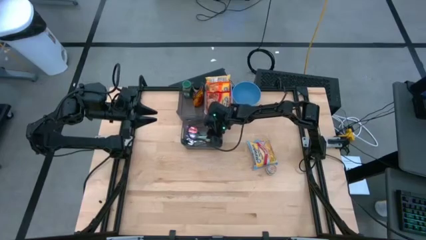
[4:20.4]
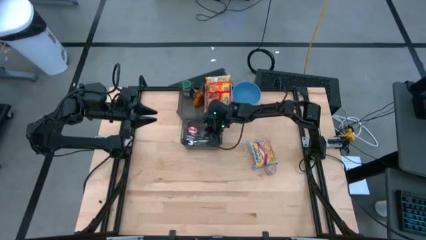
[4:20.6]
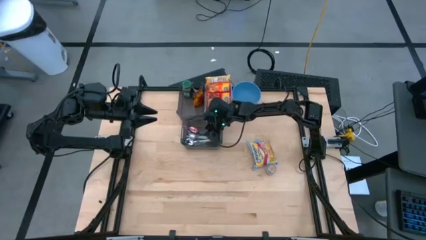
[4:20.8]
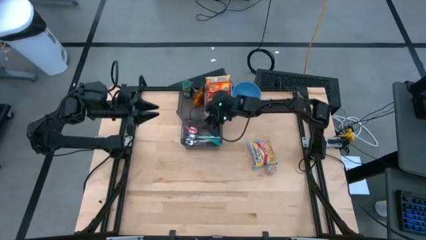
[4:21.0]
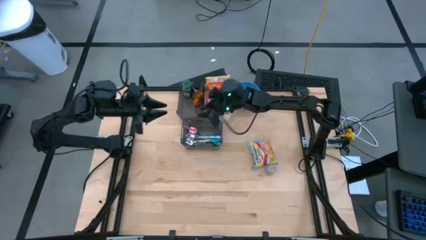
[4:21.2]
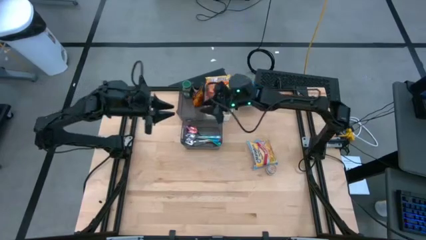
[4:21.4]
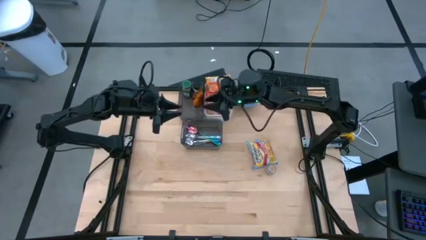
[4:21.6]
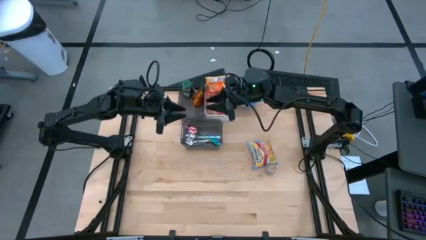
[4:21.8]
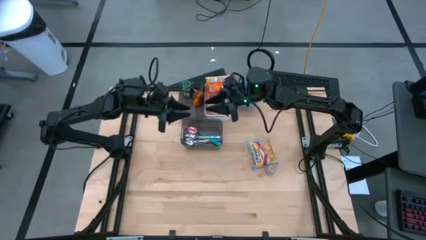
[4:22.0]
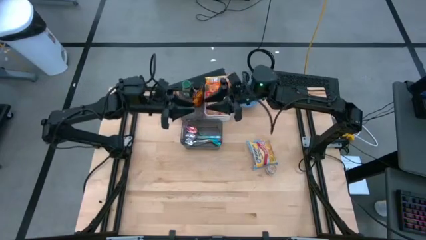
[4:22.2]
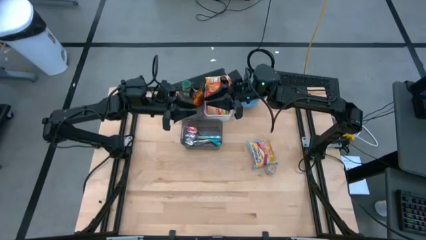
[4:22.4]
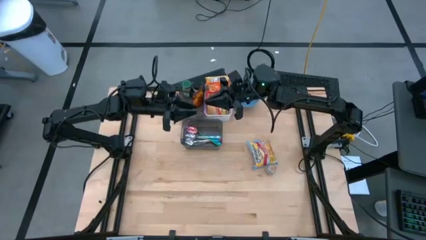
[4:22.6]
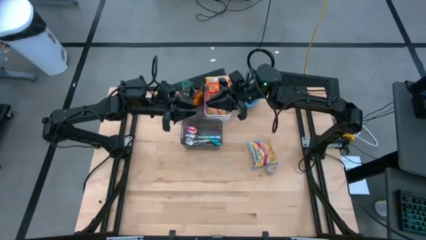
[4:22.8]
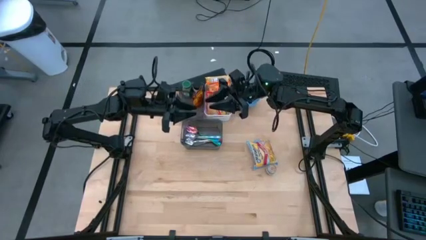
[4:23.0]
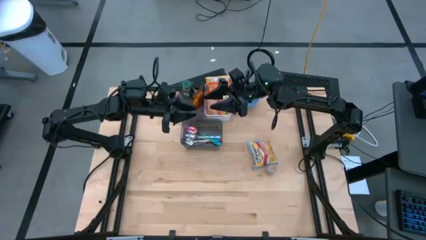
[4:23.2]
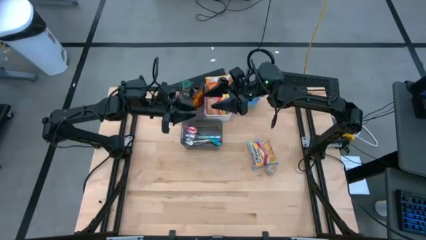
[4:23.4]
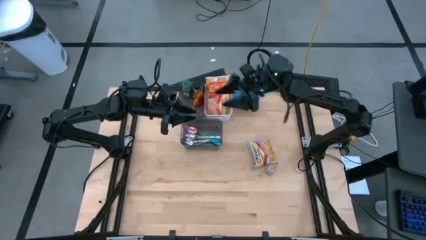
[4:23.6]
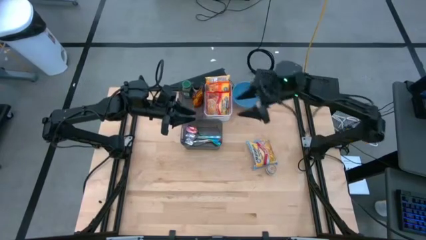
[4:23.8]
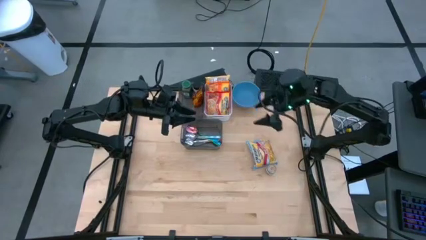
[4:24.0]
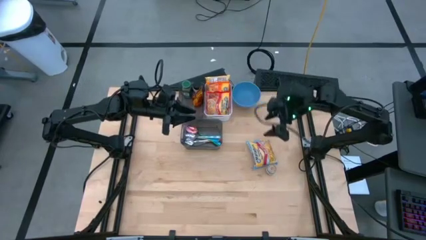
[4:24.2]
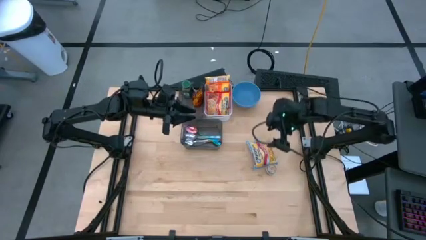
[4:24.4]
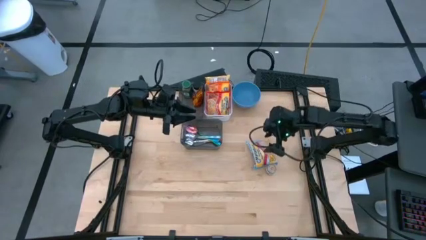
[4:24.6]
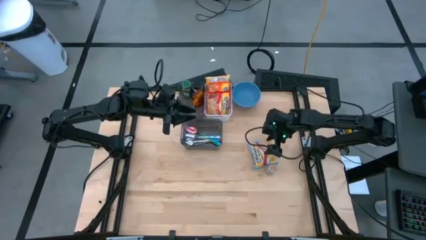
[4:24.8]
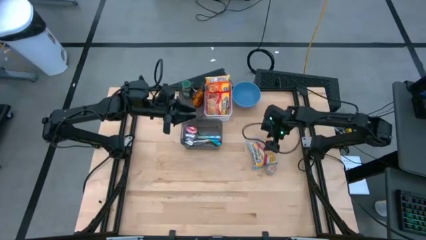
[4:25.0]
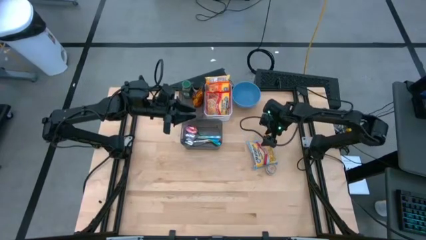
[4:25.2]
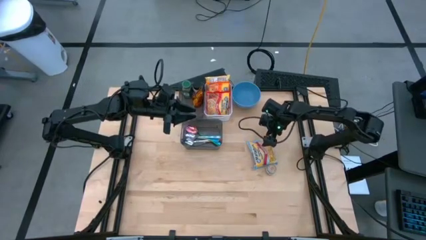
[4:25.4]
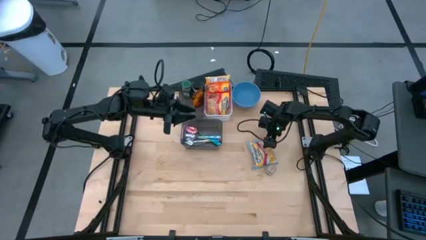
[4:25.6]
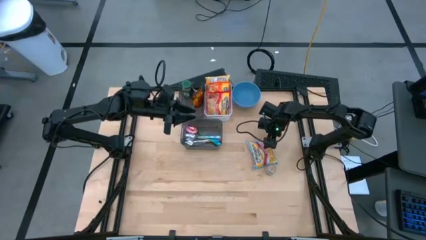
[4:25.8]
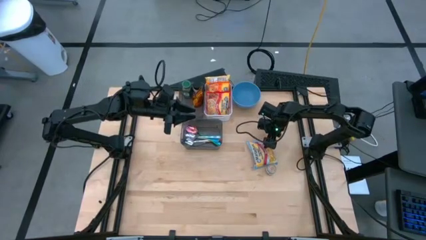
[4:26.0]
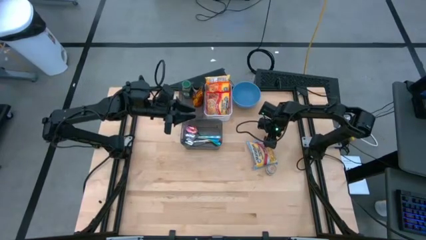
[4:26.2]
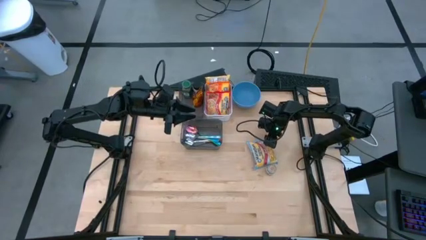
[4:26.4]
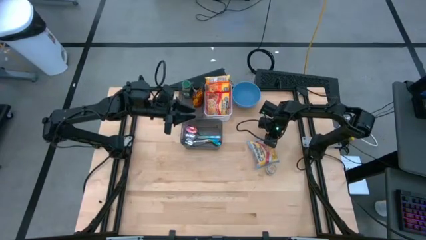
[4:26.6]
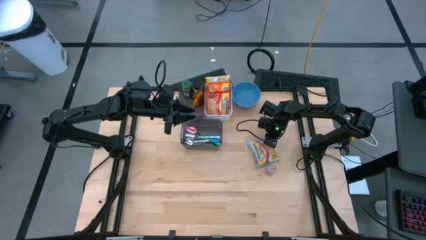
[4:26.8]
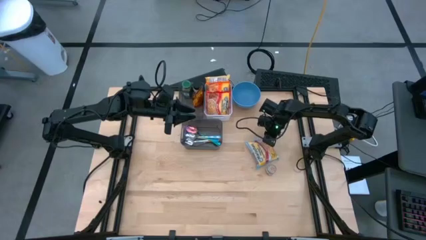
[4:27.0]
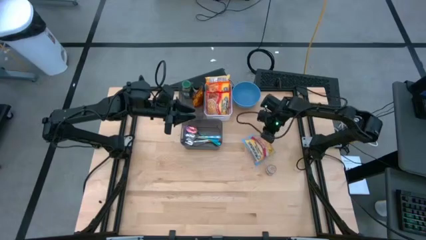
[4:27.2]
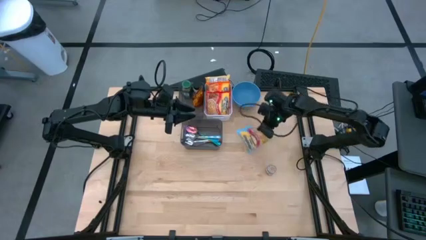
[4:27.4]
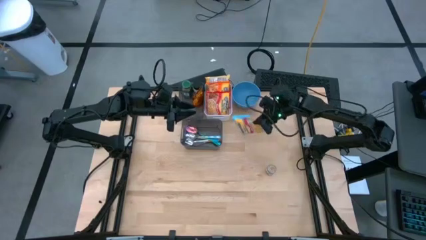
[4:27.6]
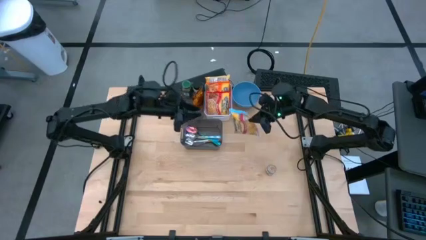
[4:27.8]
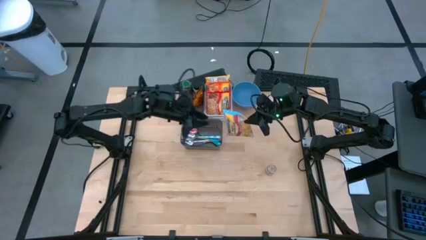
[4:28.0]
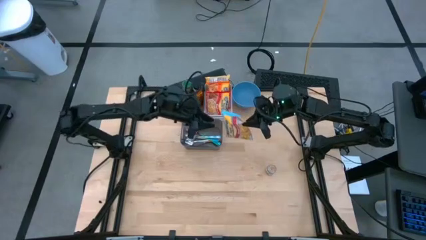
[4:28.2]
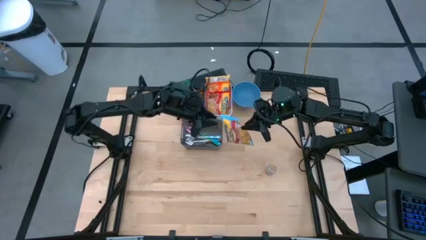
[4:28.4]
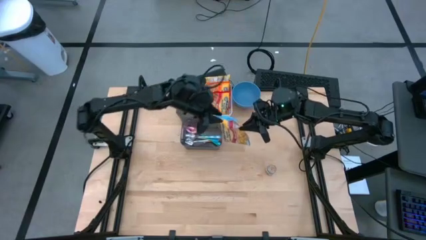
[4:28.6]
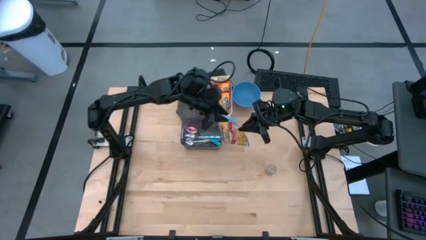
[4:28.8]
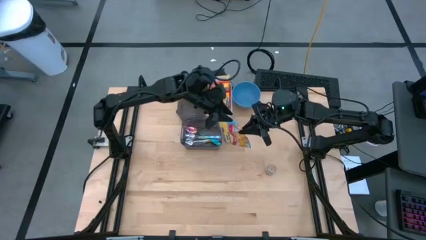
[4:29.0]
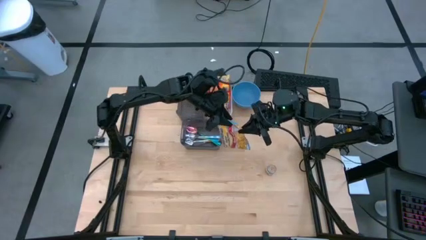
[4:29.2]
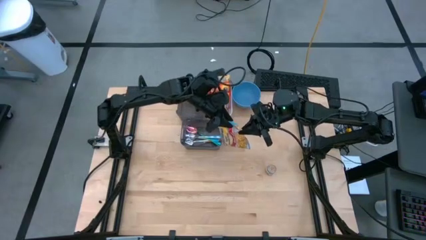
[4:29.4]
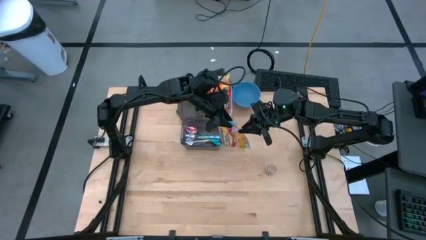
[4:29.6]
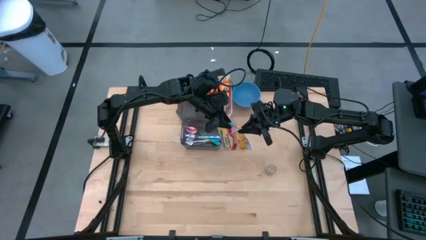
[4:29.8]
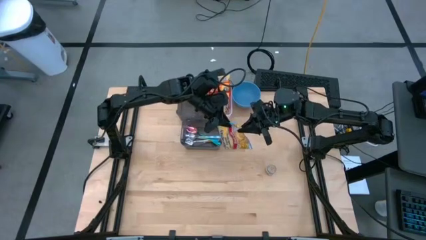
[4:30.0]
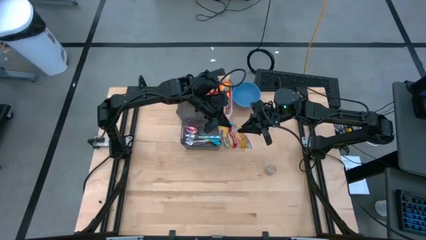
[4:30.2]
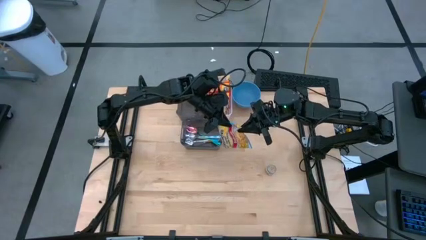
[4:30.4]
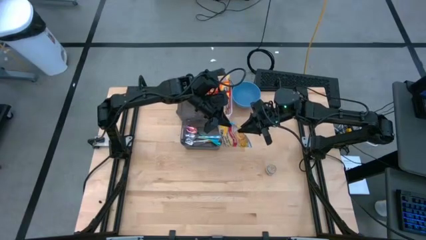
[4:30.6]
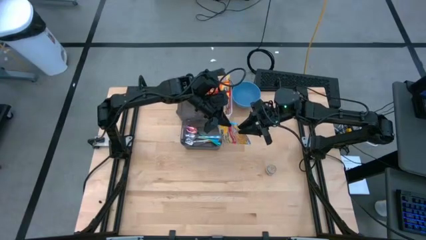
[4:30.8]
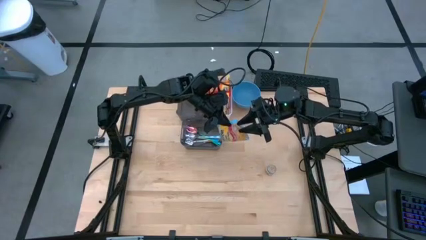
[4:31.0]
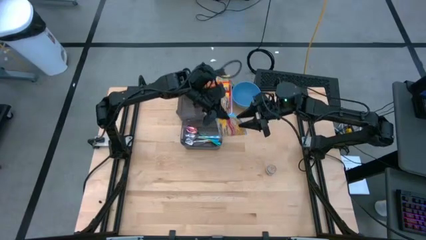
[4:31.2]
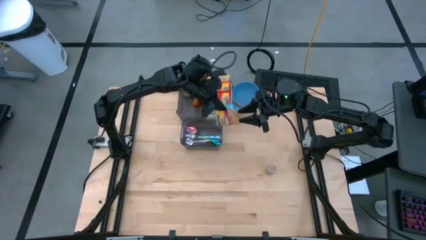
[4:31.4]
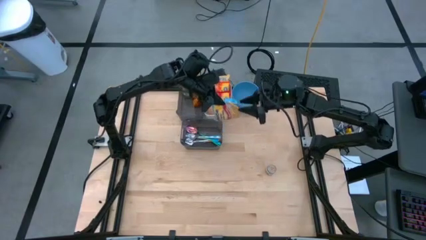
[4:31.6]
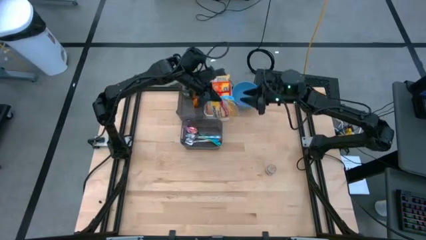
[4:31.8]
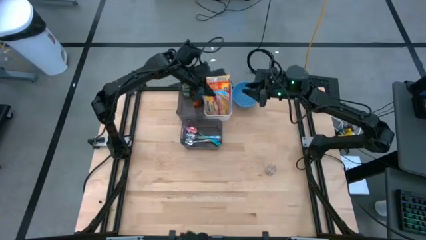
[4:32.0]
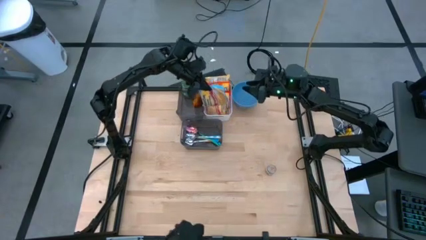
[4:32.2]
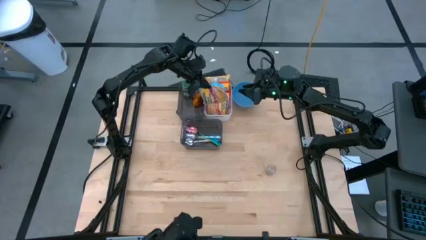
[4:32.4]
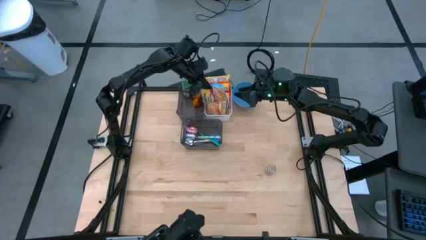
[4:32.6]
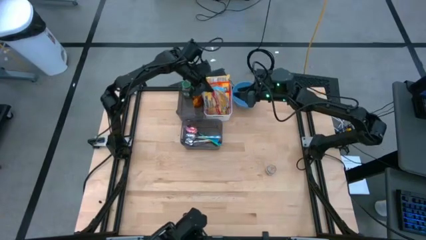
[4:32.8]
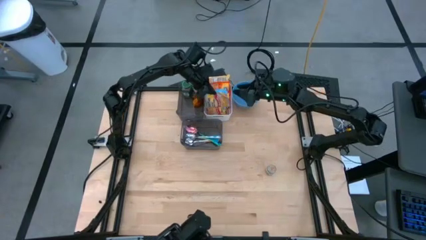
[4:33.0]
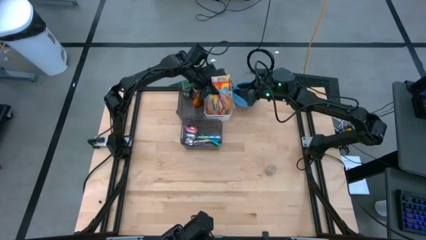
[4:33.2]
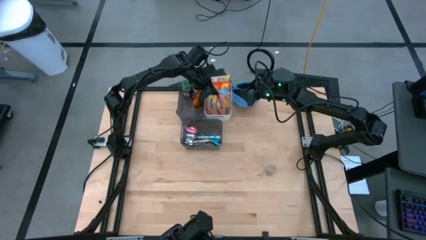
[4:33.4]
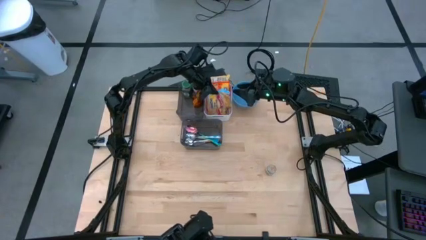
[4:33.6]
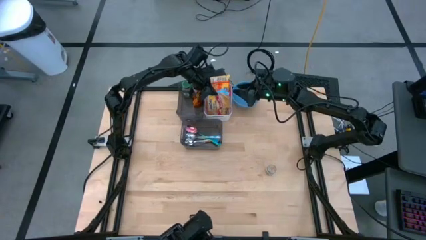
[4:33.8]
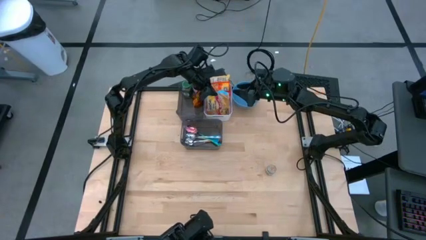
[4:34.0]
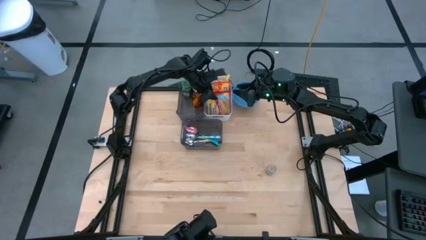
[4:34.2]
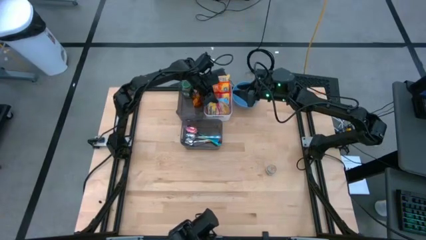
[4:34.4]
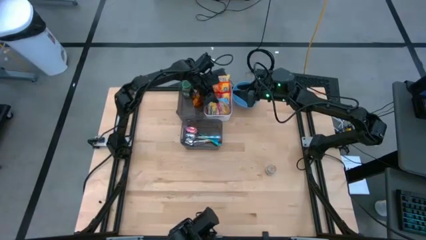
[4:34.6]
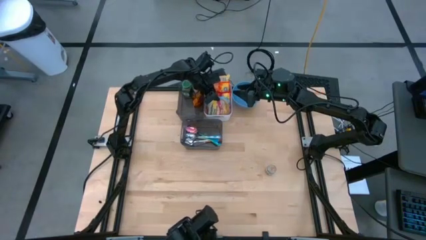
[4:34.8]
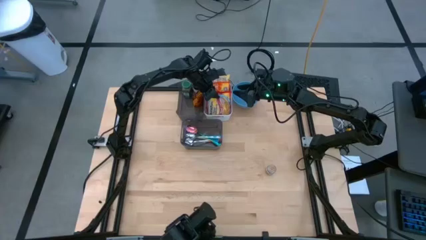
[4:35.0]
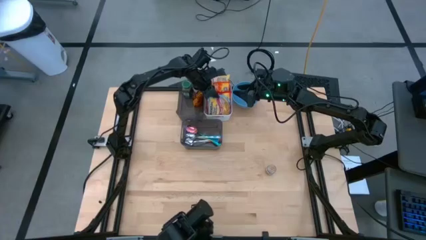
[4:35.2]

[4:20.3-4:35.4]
Task: Pick & Place Food Item
Put the blue noodle pack into the white bin
